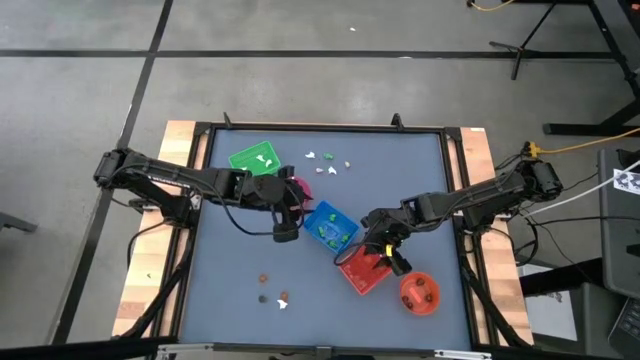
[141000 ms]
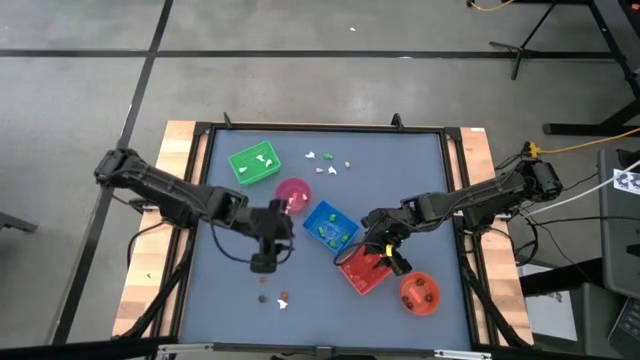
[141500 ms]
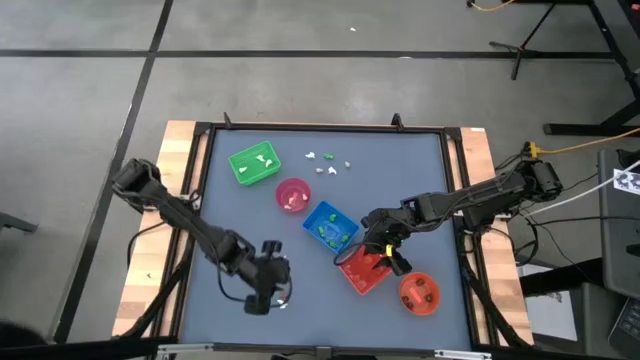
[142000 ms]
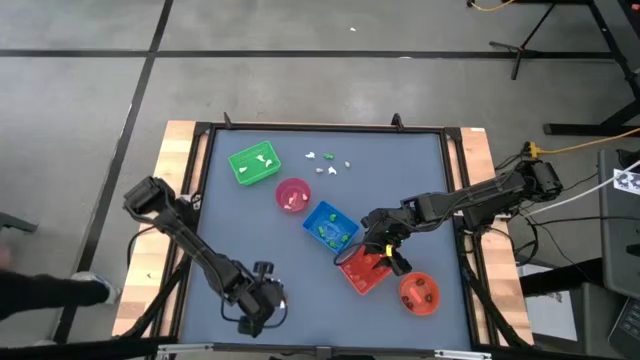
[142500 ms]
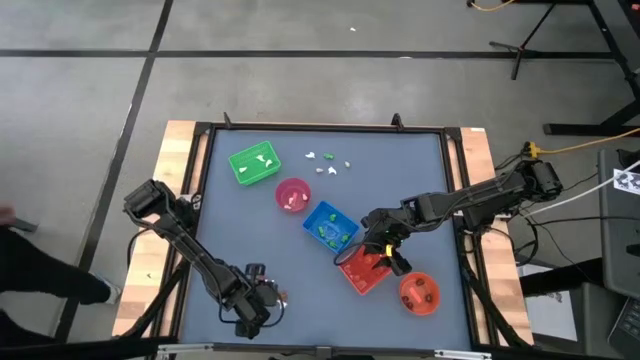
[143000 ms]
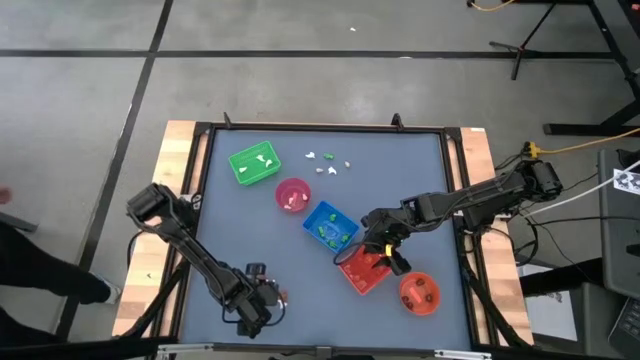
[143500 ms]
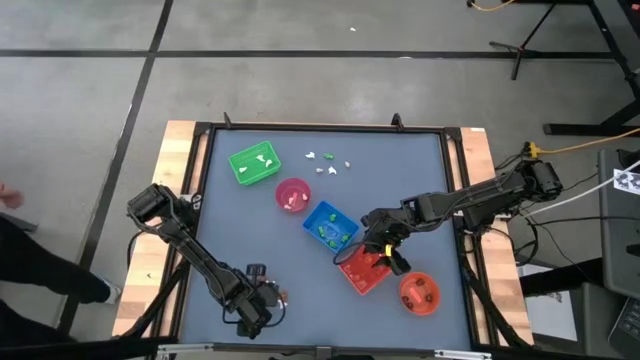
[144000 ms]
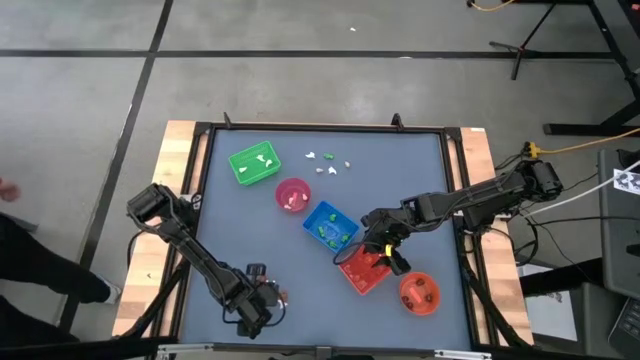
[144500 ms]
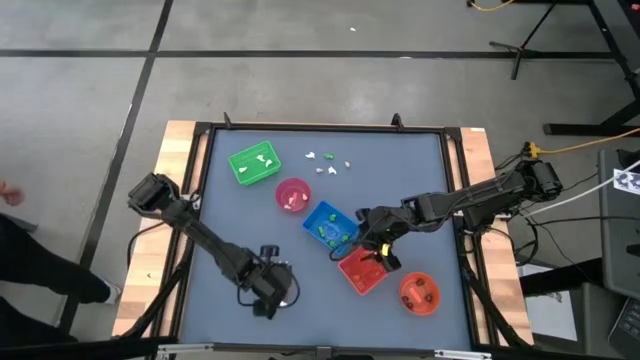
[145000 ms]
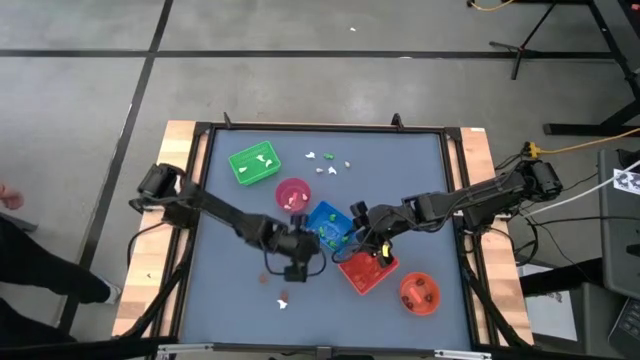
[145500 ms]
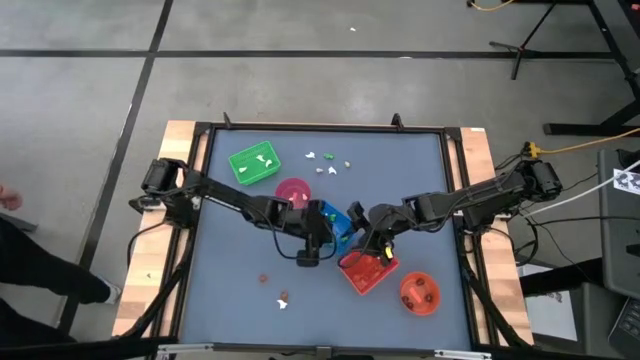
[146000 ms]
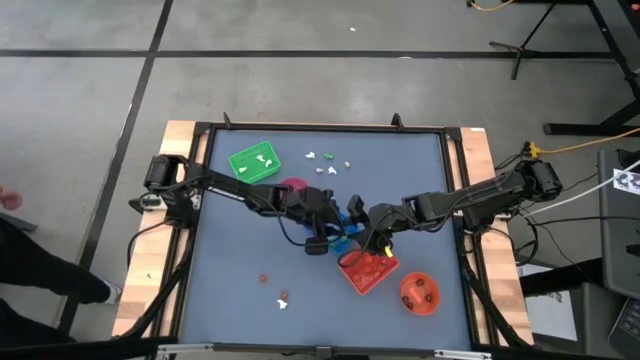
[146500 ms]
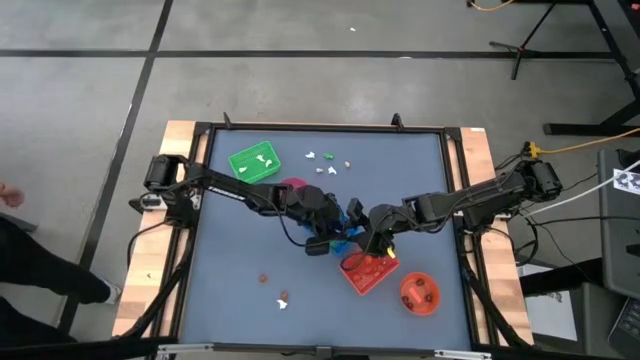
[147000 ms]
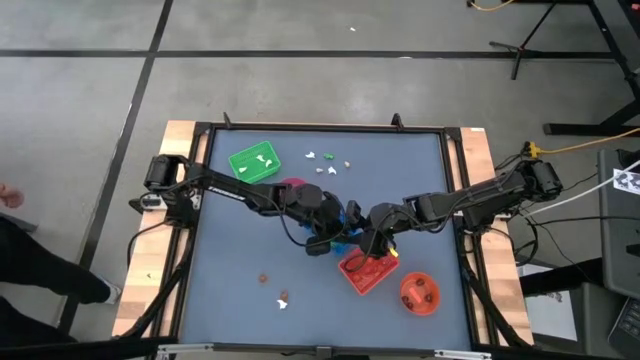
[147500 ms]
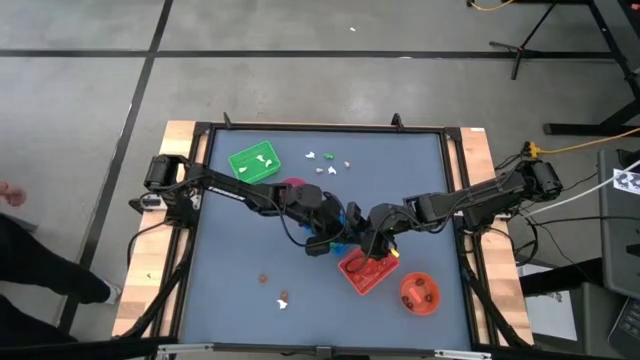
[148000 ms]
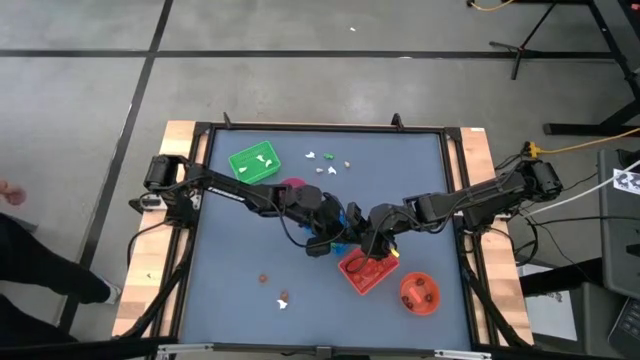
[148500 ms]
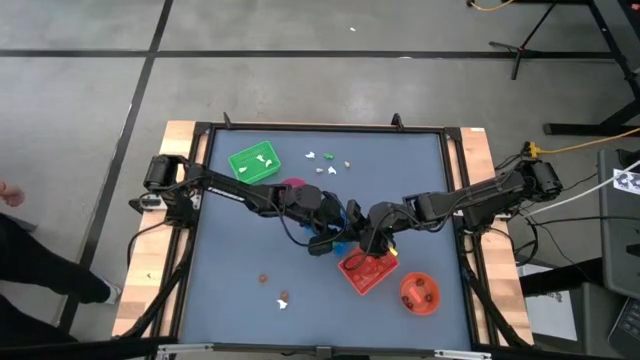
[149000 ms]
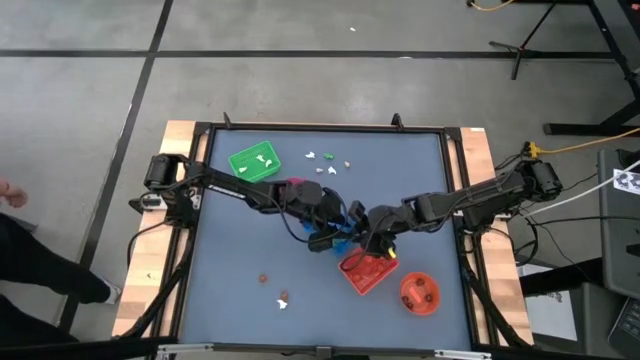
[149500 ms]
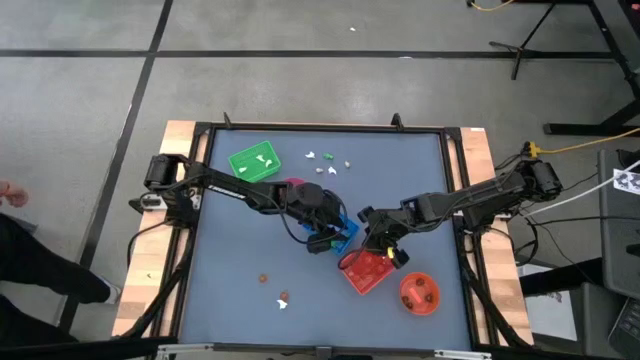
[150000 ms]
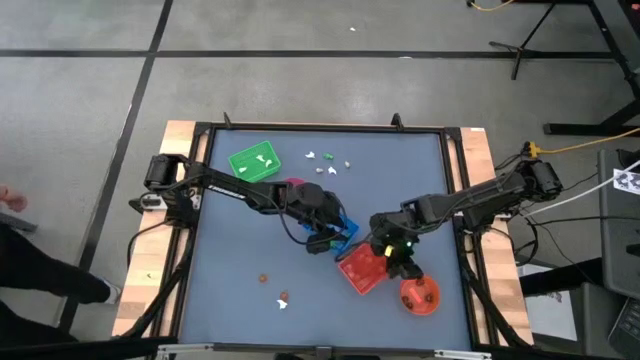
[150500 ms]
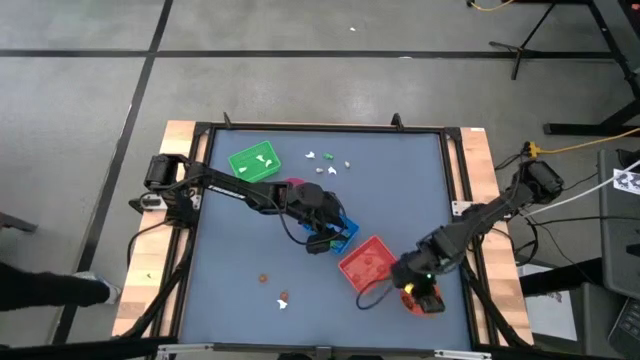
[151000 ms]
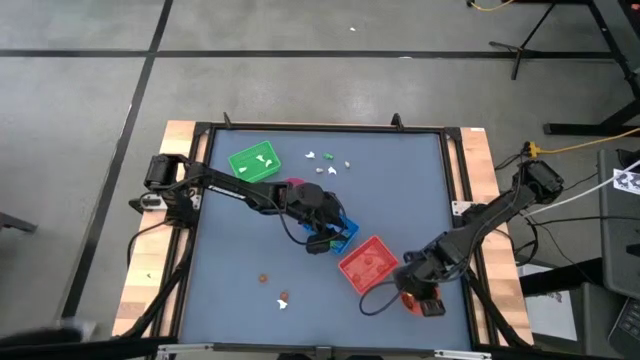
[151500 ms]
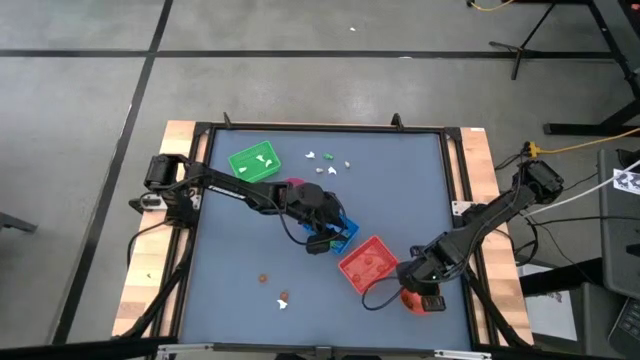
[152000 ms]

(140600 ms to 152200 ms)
Task: Sort Halloween decoration
Put the black skull toy into the transparent orange bin

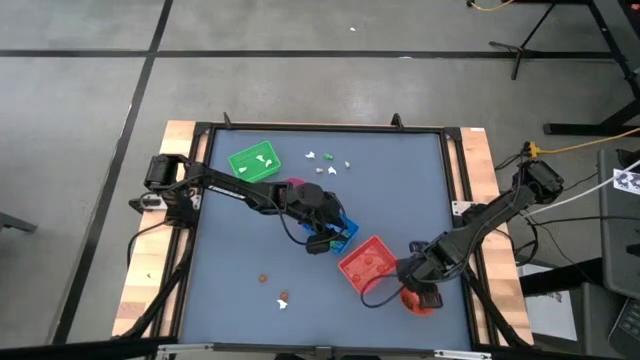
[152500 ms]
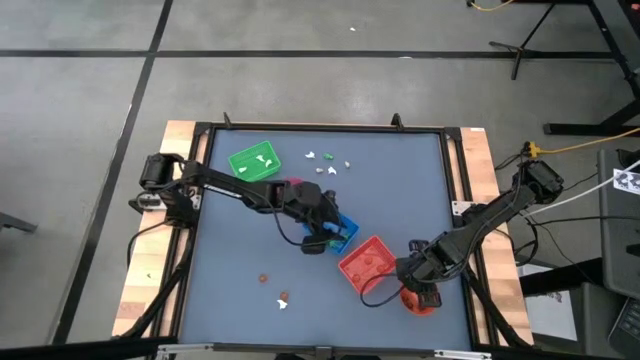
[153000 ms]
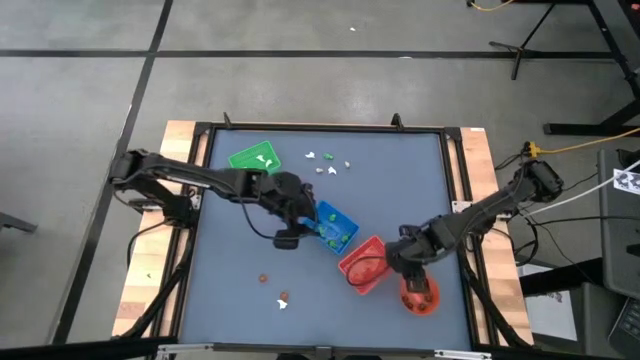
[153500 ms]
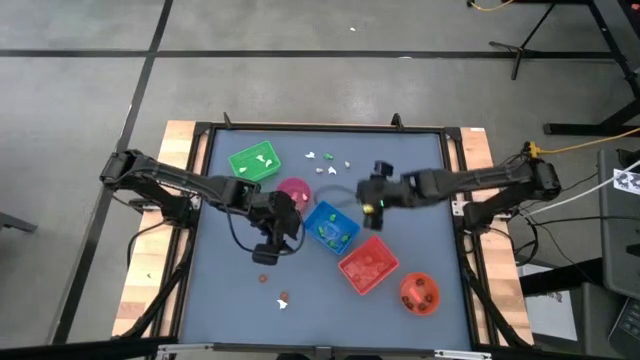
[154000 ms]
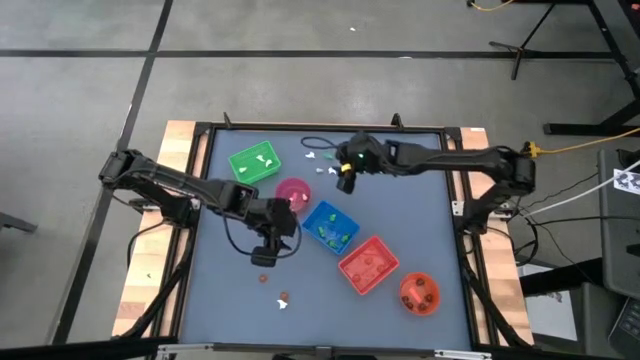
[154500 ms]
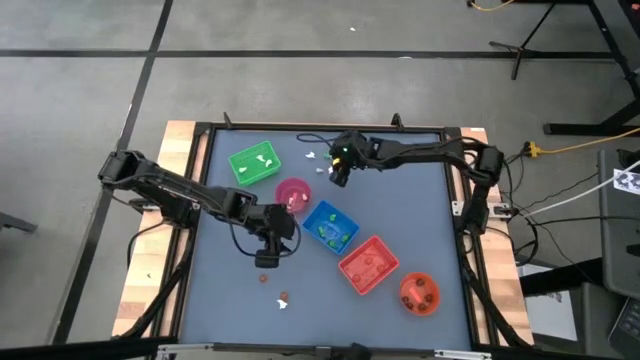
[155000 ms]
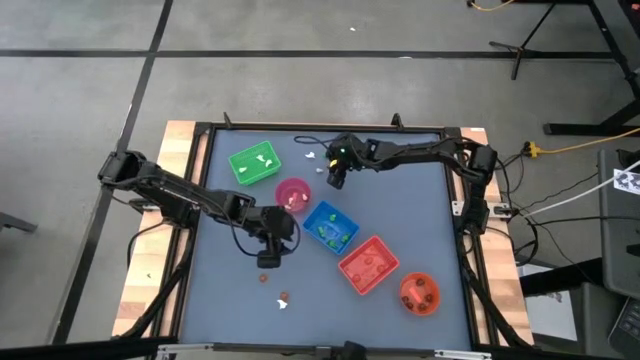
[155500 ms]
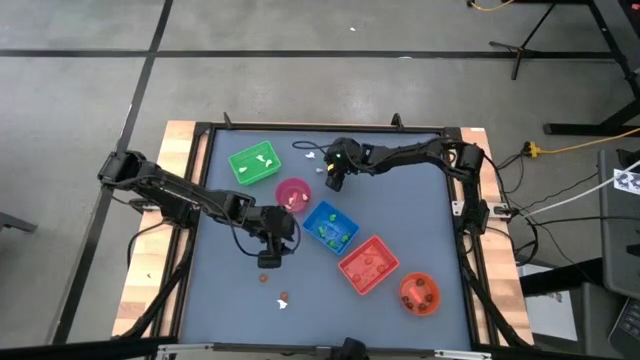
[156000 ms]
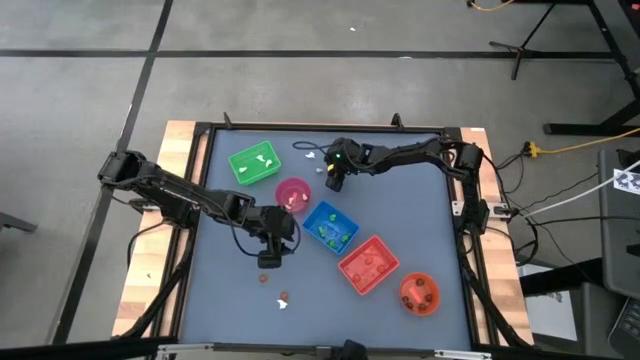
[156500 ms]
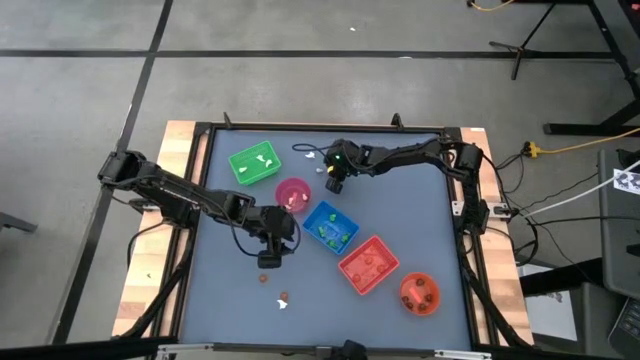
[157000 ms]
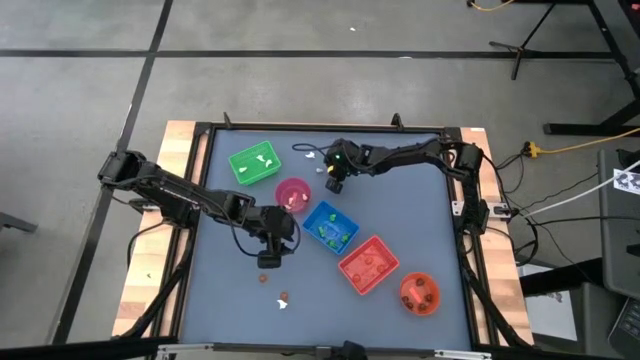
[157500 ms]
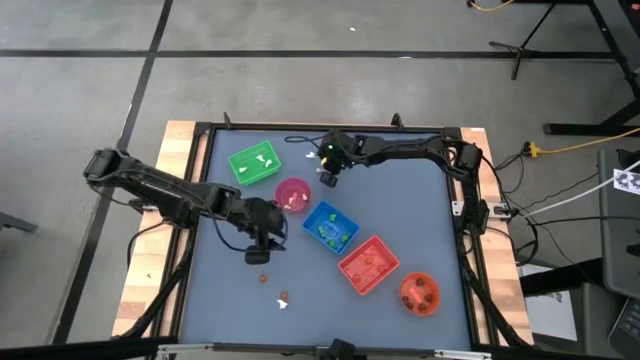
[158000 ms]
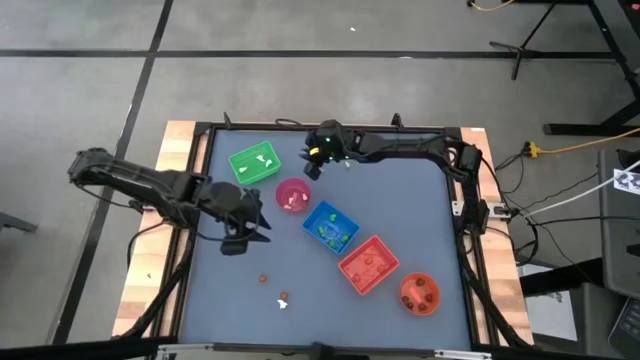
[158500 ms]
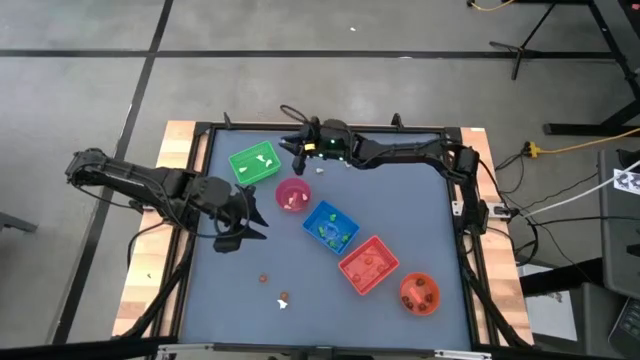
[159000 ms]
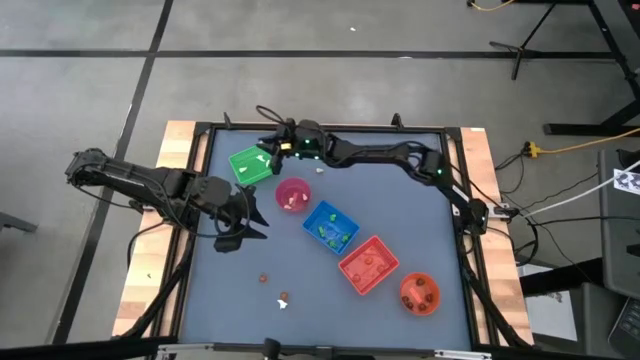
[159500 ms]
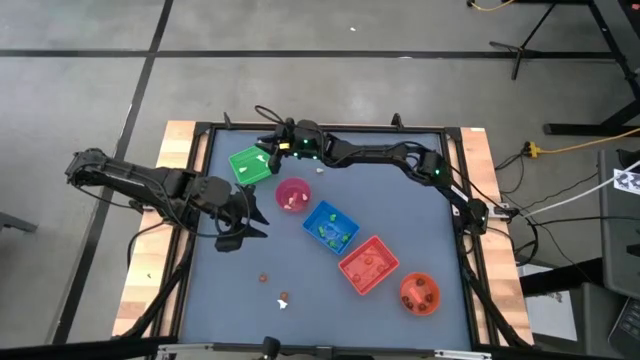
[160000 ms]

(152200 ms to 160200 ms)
Put the white ghost toy into the green bin

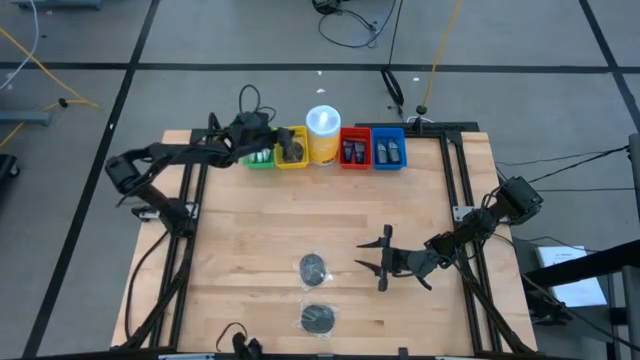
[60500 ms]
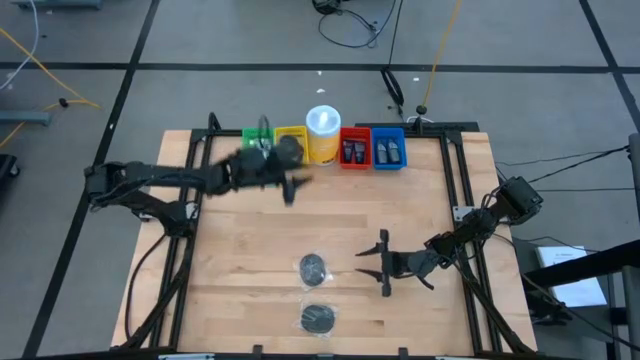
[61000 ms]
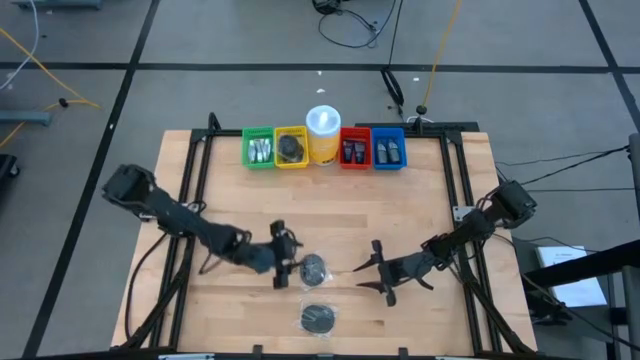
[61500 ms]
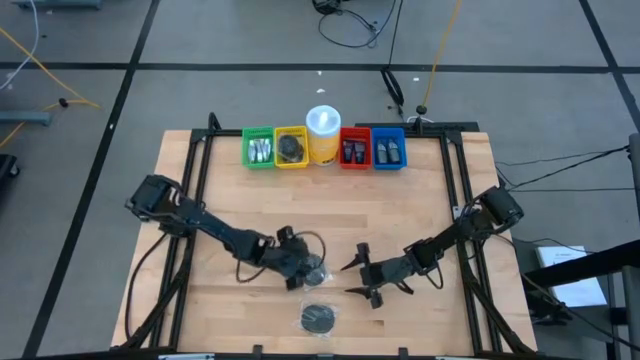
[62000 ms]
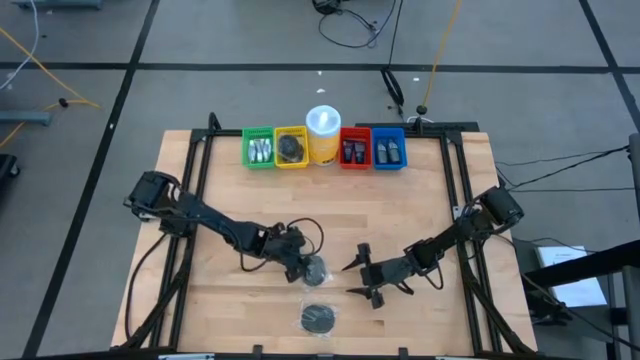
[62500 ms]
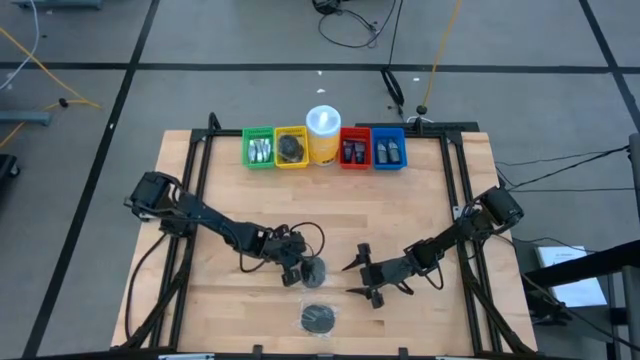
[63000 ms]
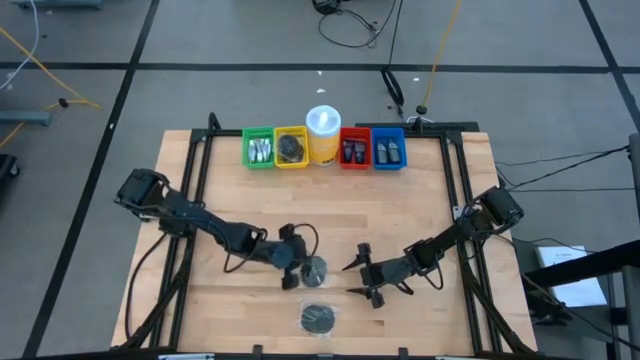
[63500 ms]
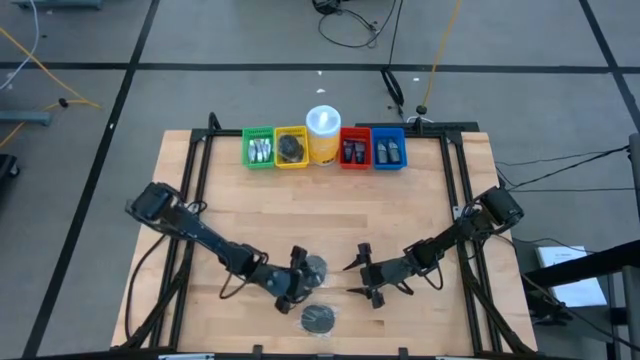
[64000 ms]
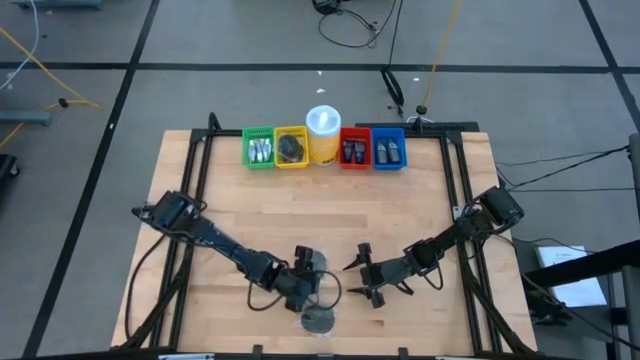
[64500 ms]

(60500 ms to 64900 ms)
Task: Pick & Place Travel size toiletries
Put the black hairbrush into the yellow basket
